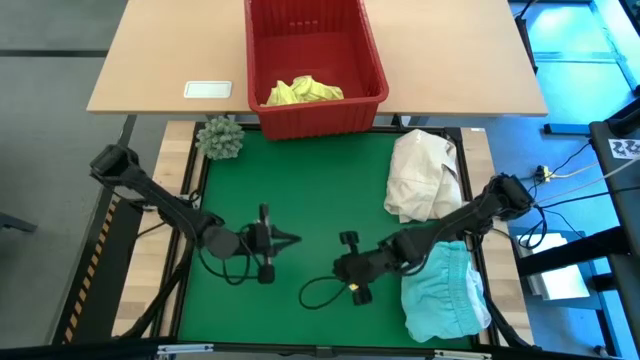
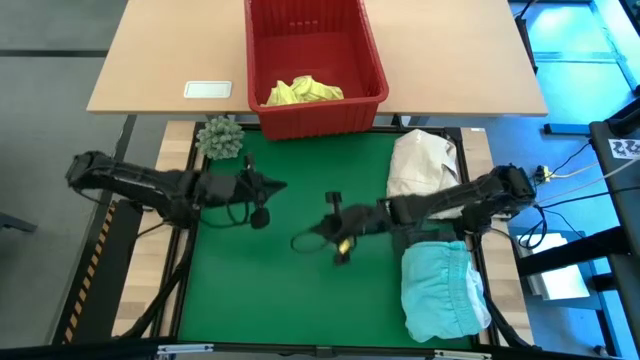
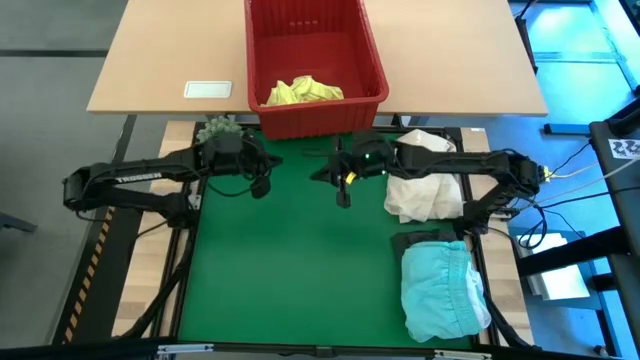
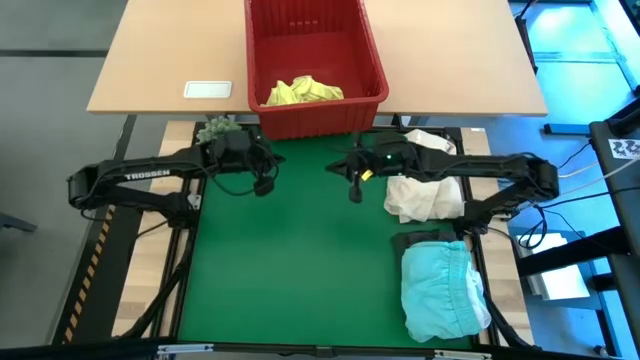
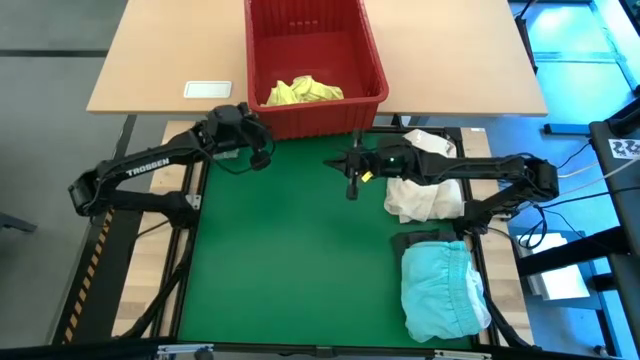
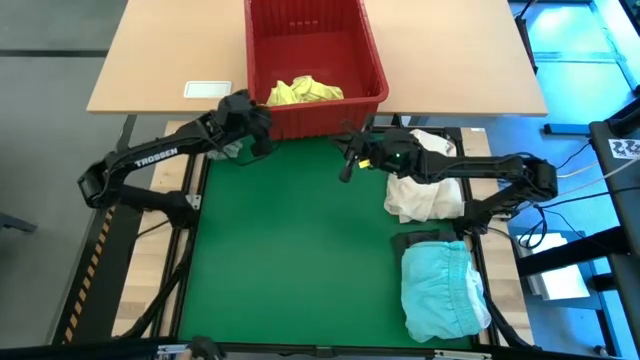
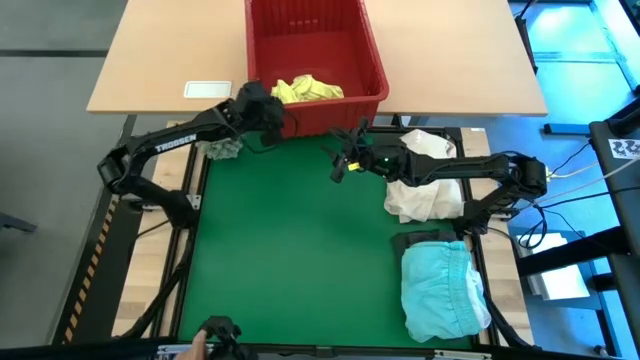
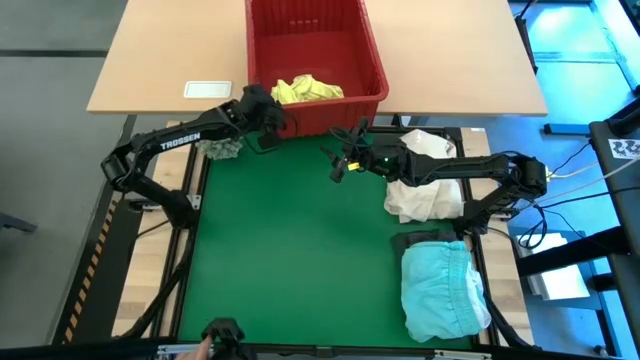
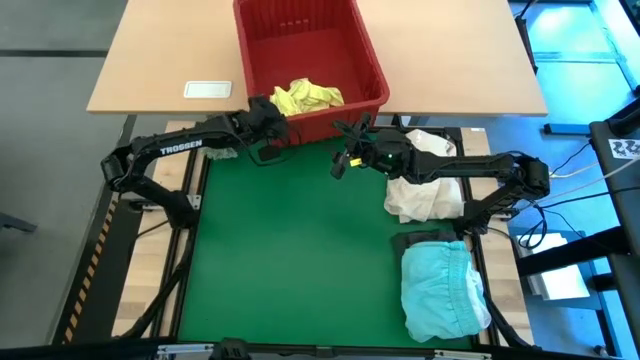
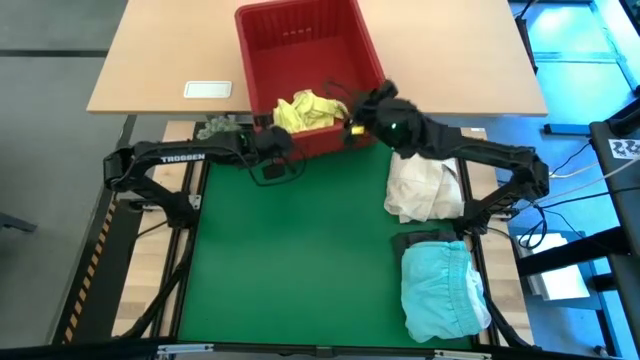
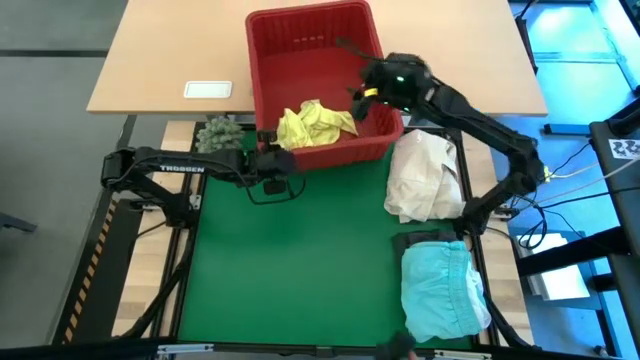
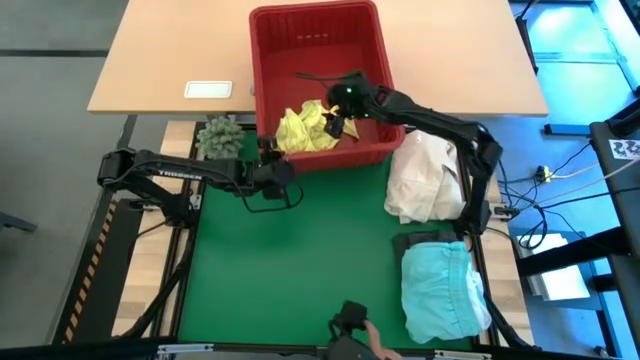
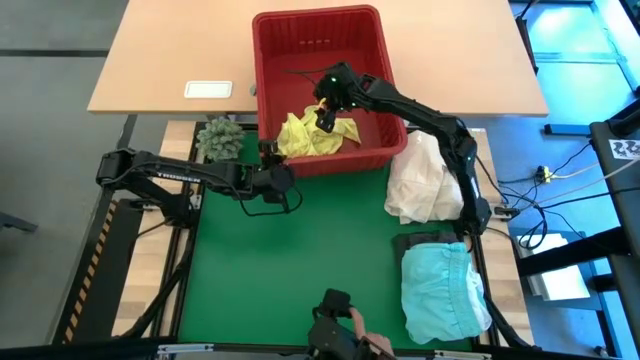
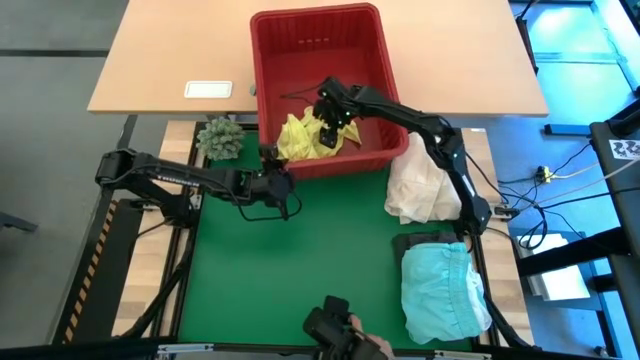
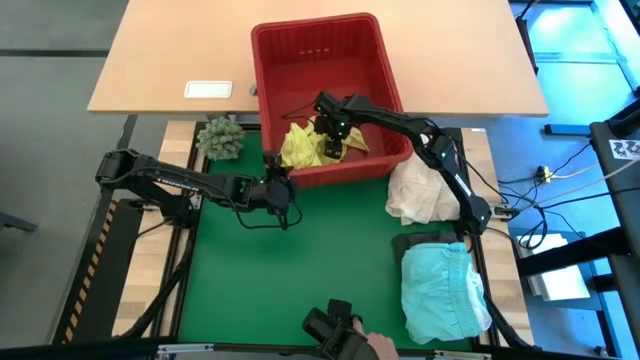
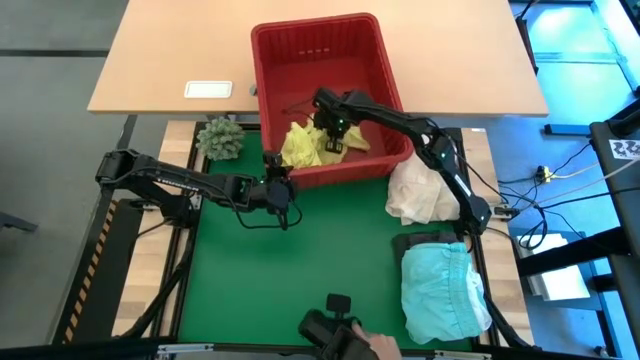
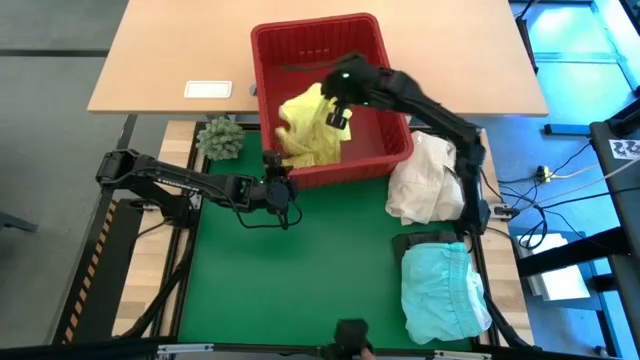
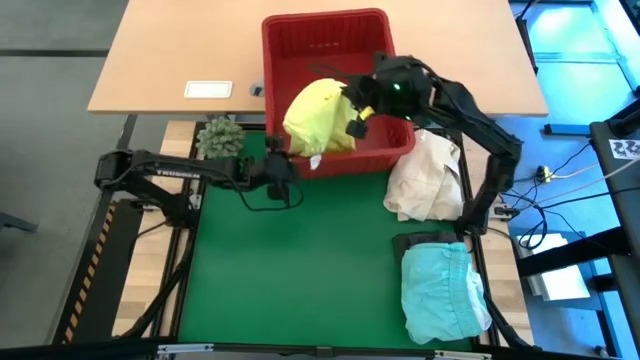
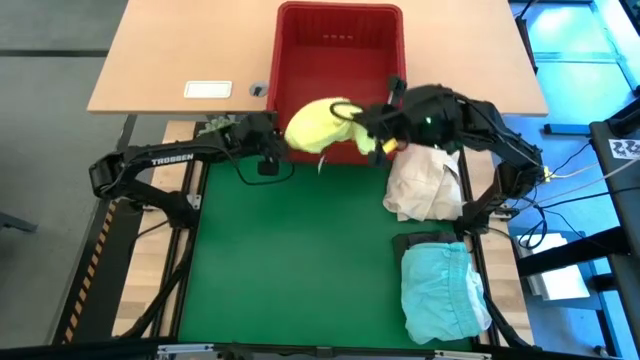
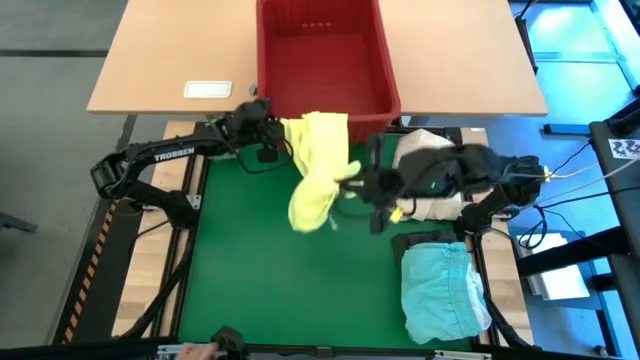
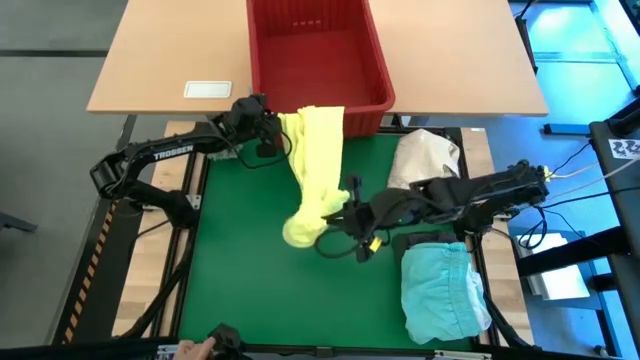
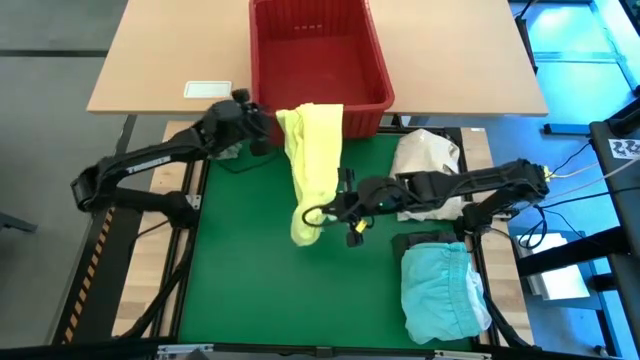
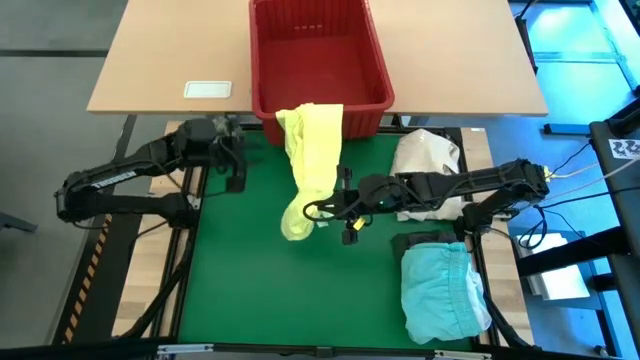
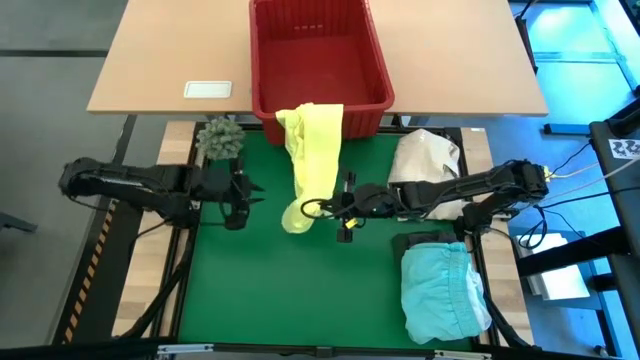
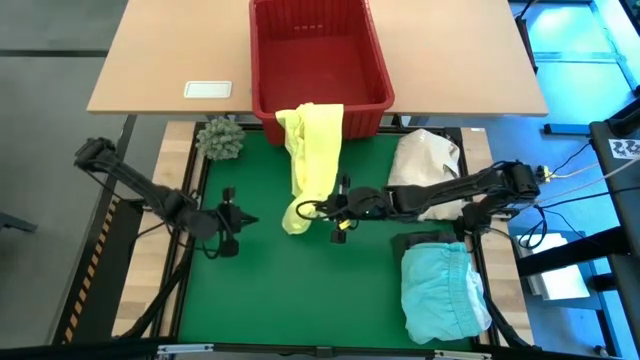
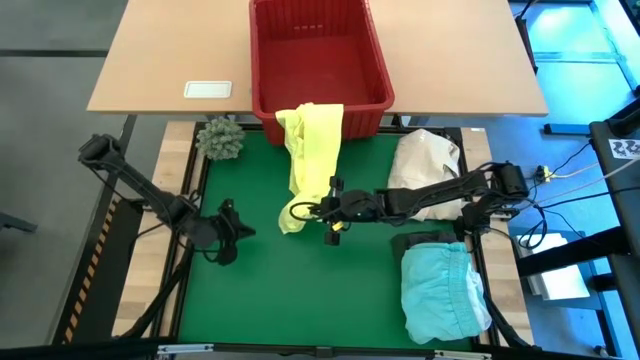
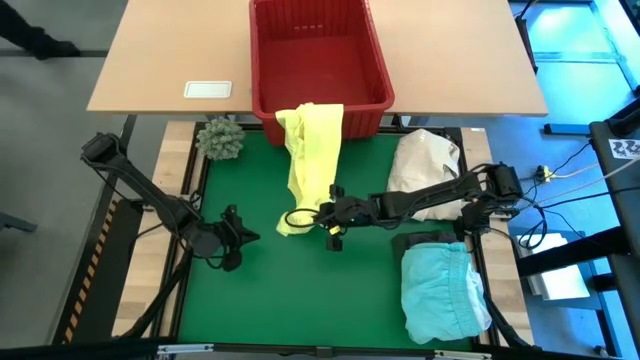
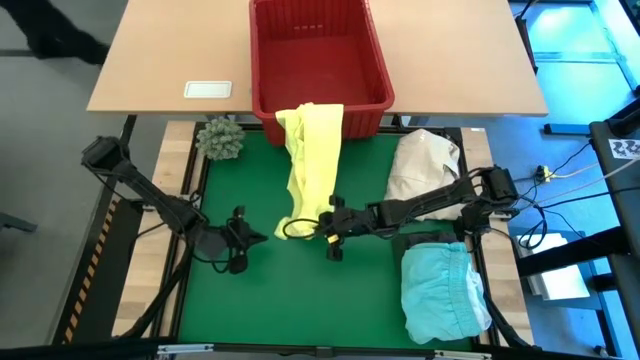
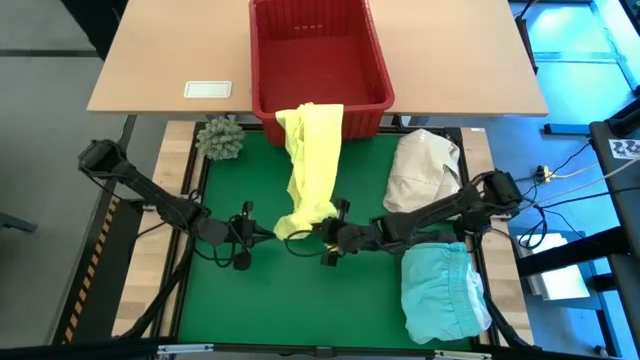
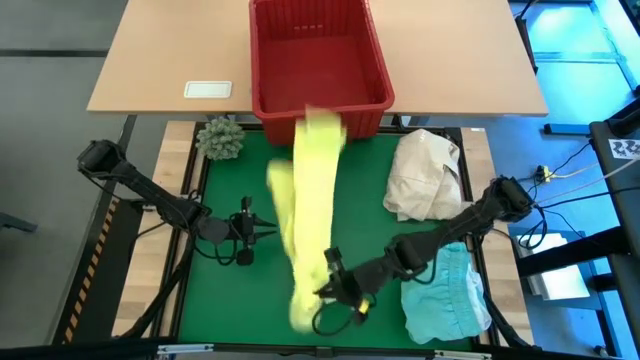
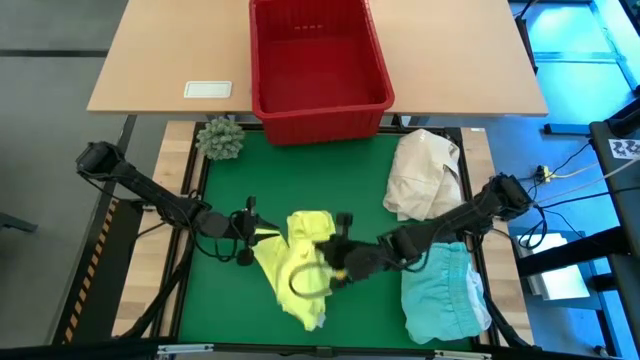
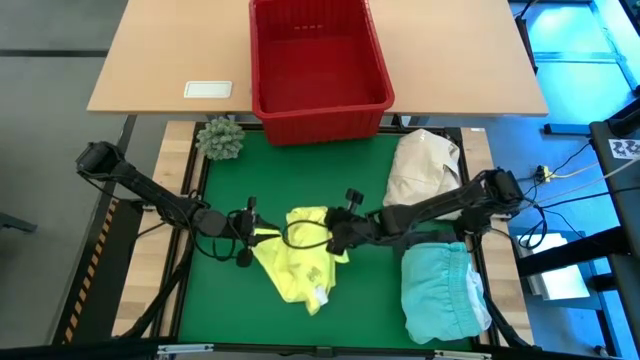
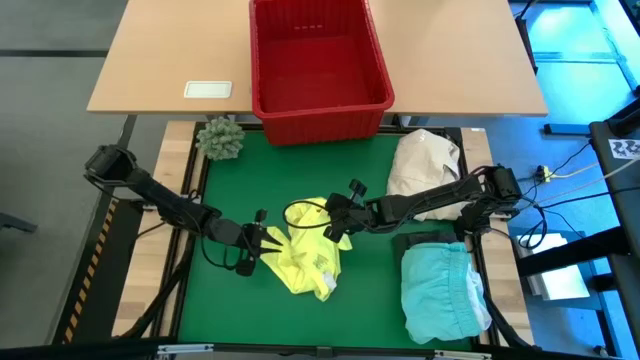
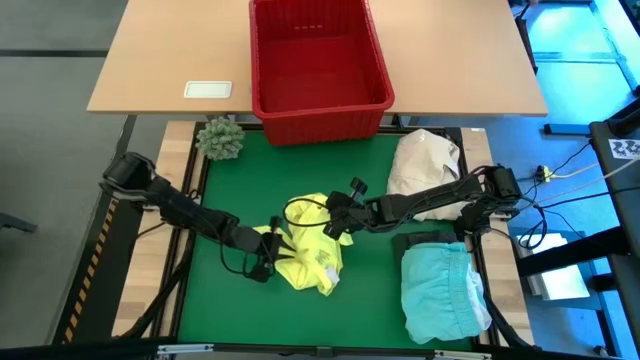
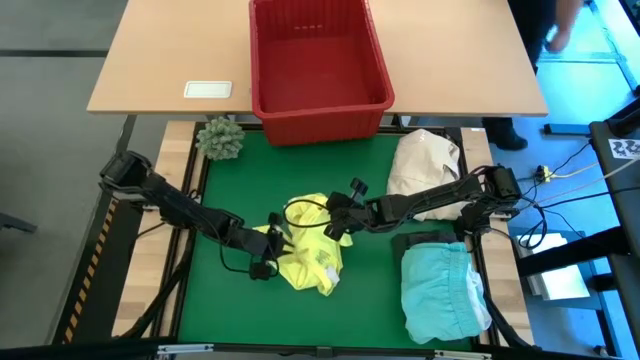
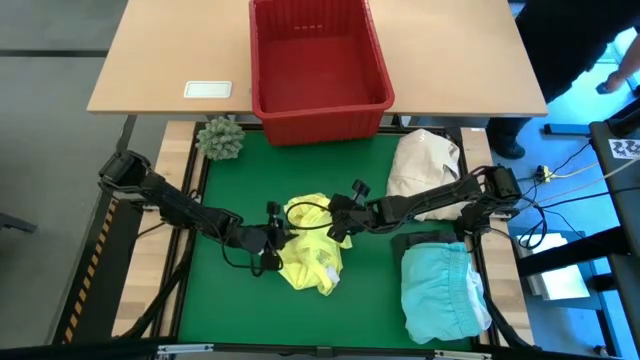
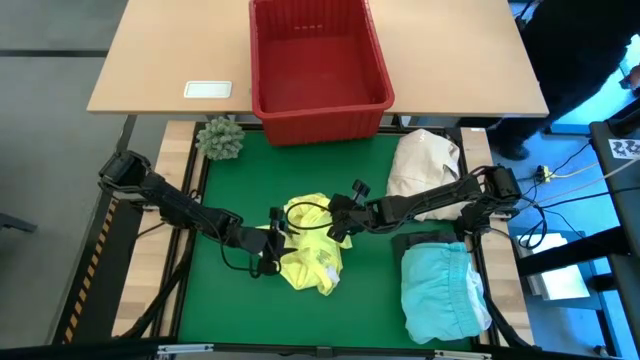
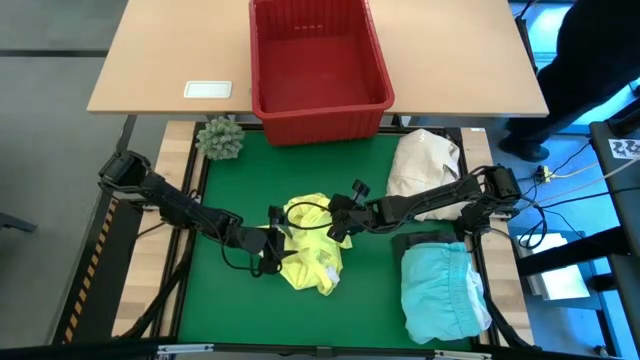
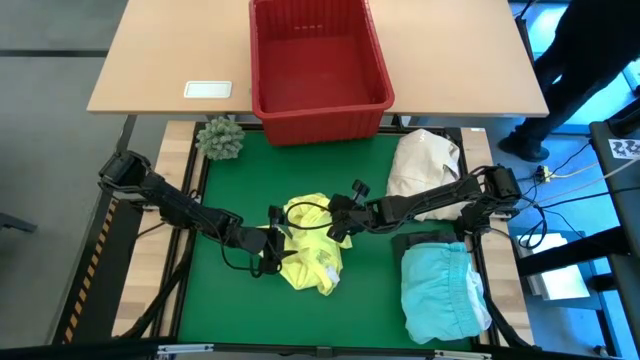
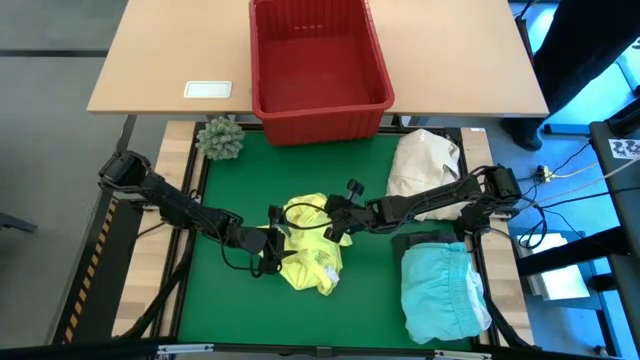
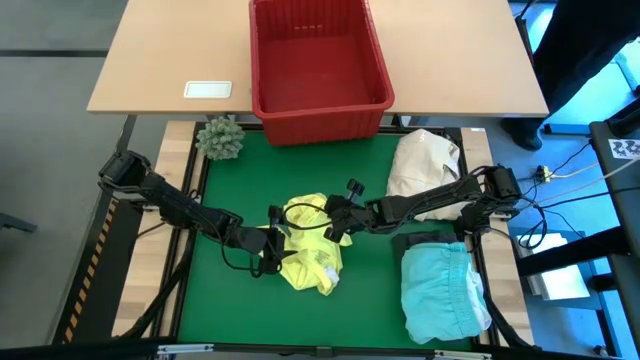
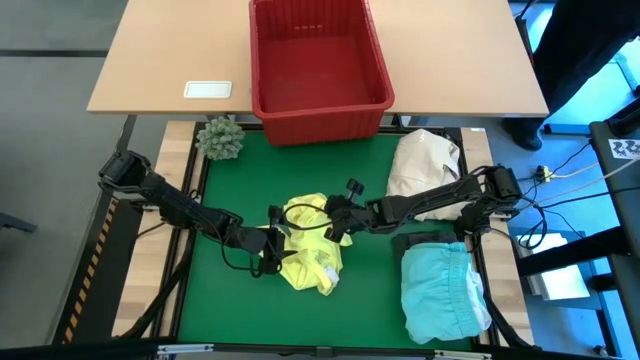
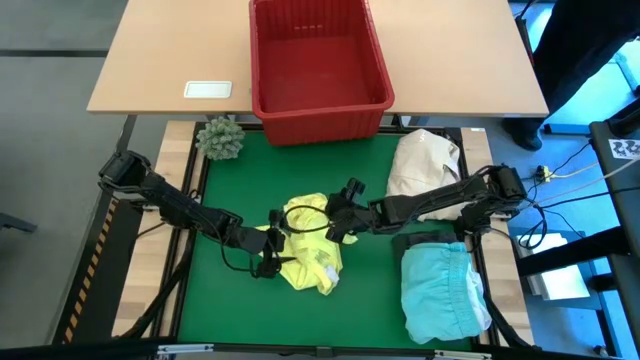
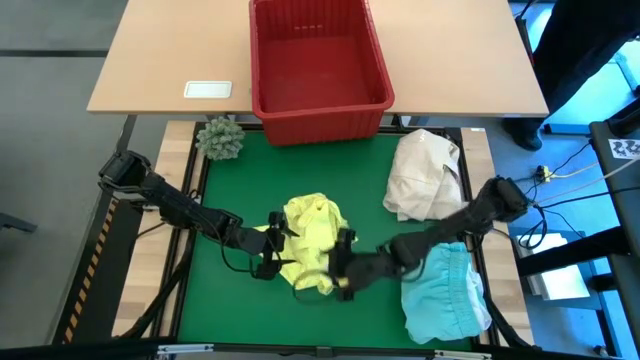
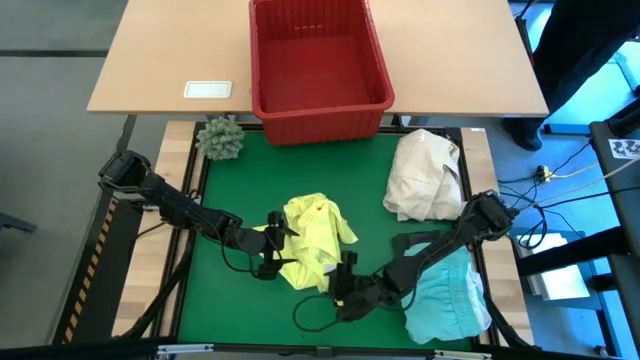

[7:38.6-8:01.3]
Task: Fold Laundry from Bin
Fold the yellow shirt
